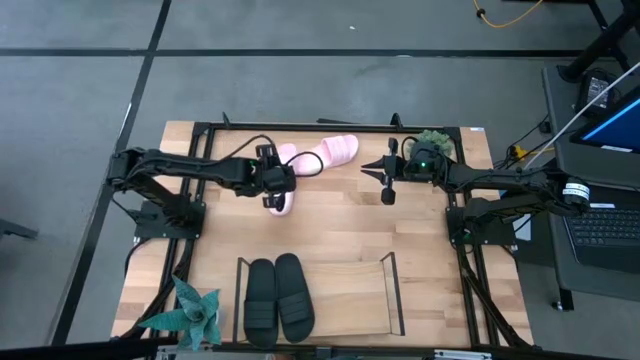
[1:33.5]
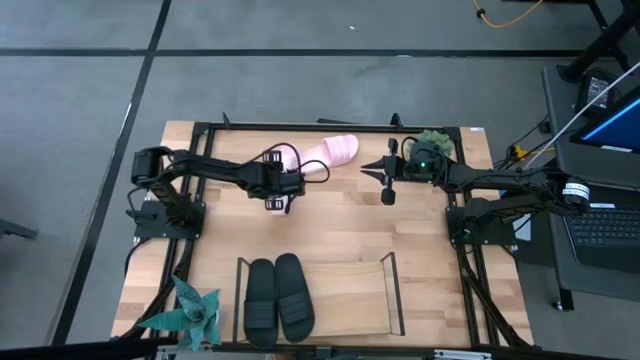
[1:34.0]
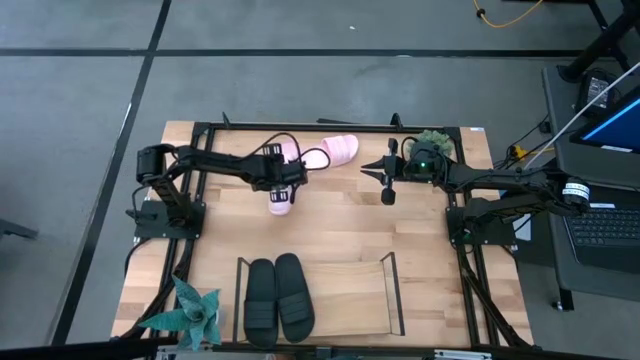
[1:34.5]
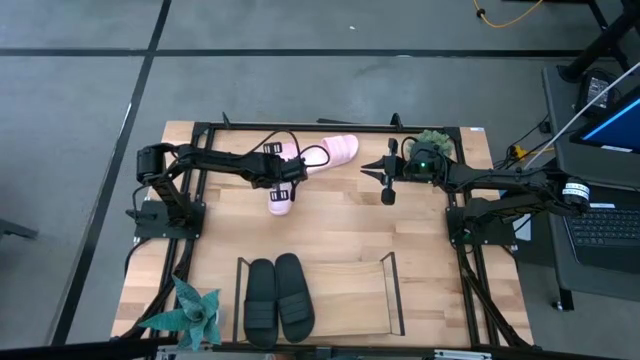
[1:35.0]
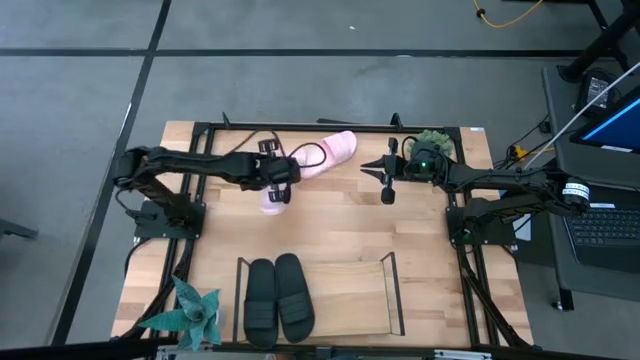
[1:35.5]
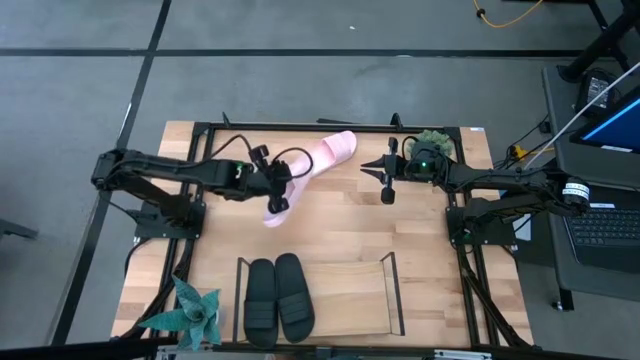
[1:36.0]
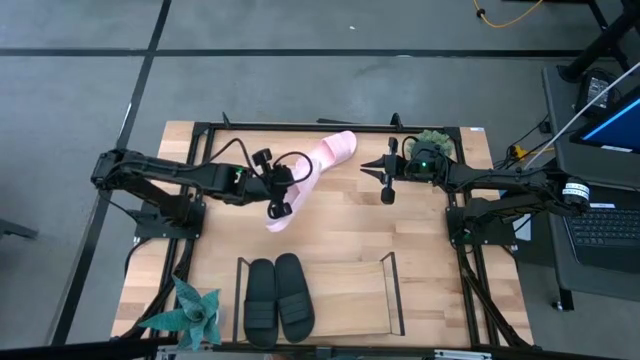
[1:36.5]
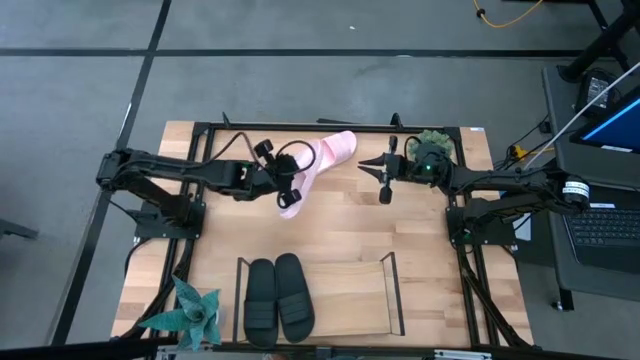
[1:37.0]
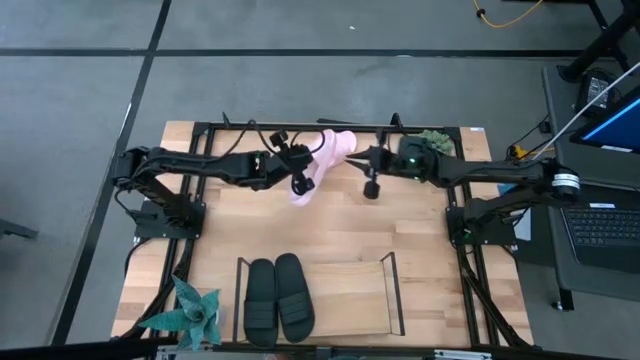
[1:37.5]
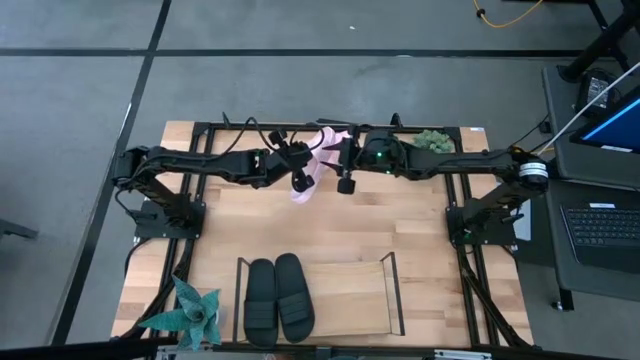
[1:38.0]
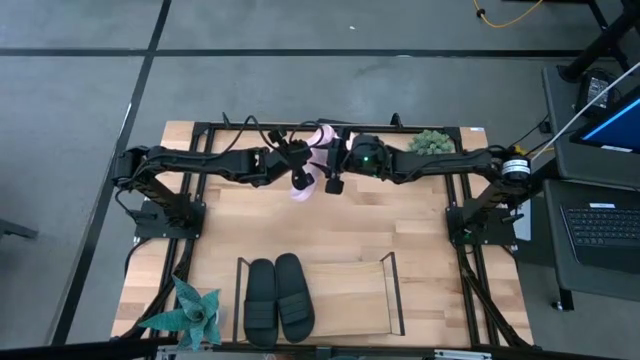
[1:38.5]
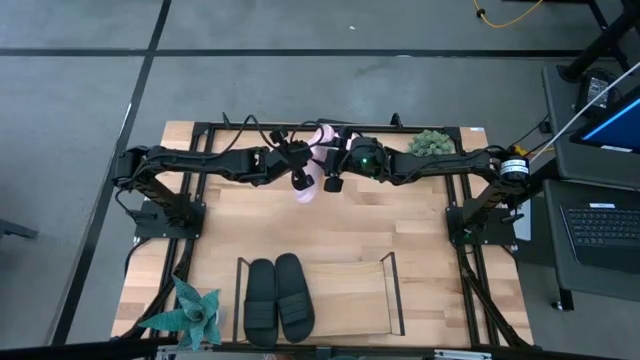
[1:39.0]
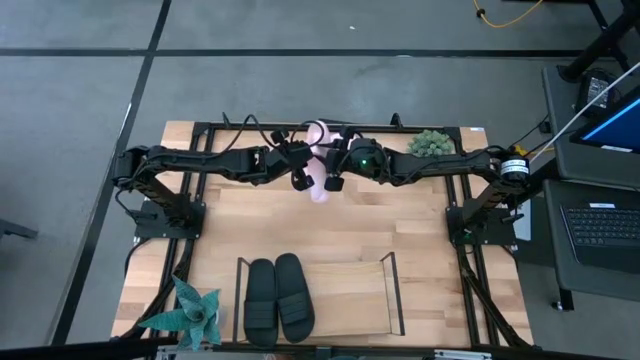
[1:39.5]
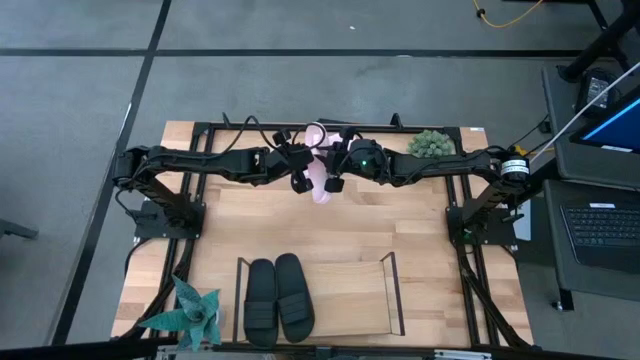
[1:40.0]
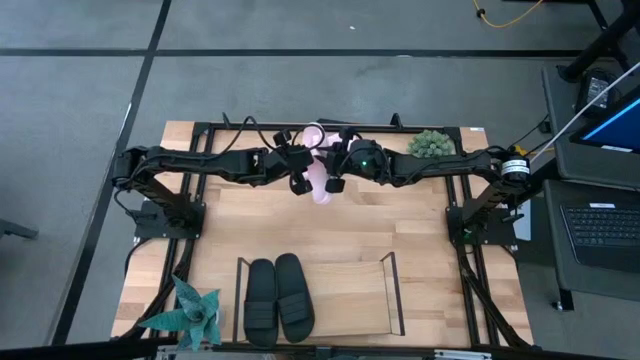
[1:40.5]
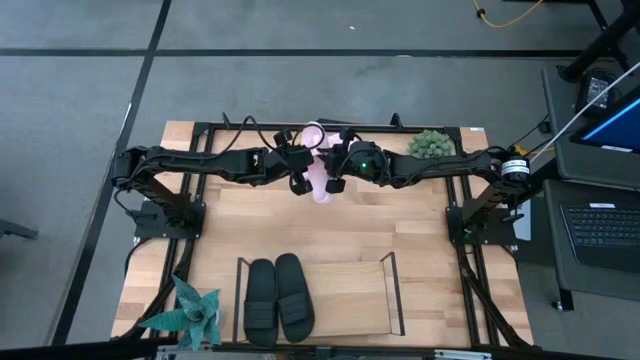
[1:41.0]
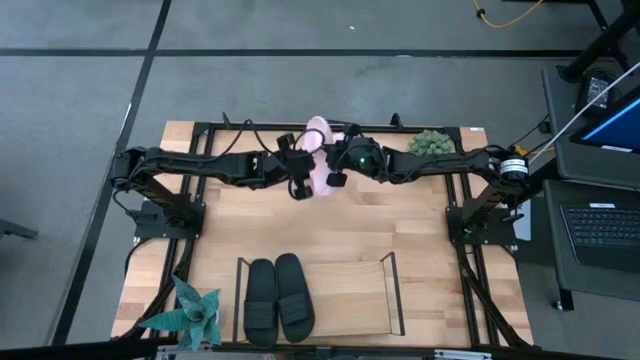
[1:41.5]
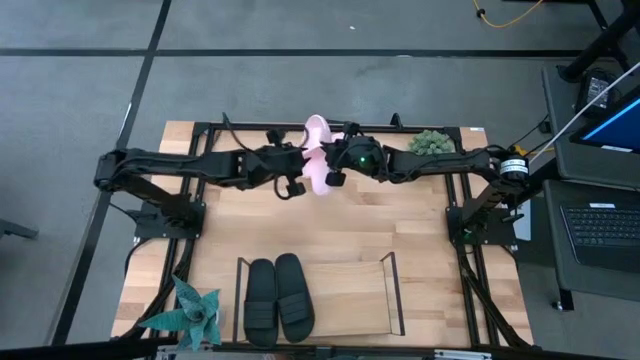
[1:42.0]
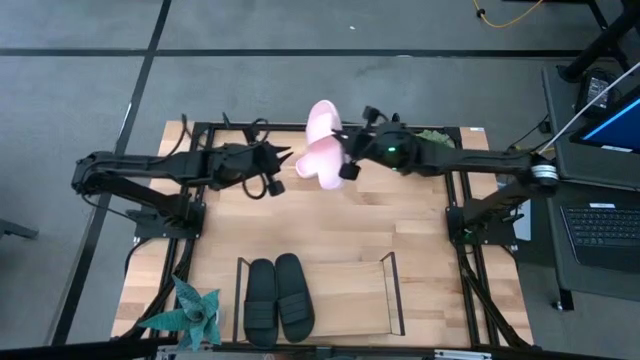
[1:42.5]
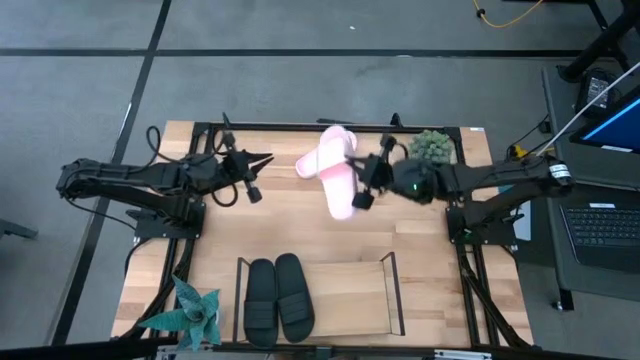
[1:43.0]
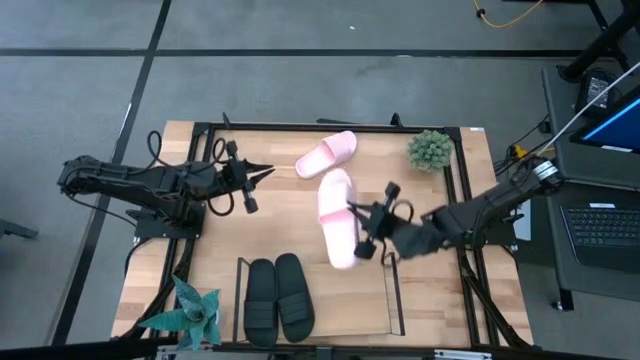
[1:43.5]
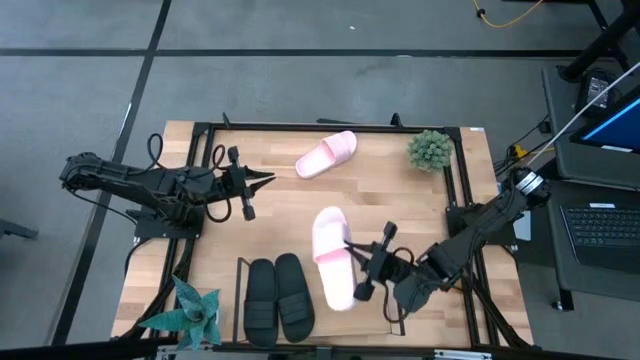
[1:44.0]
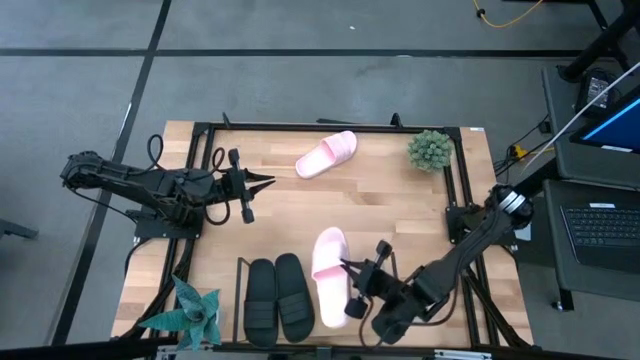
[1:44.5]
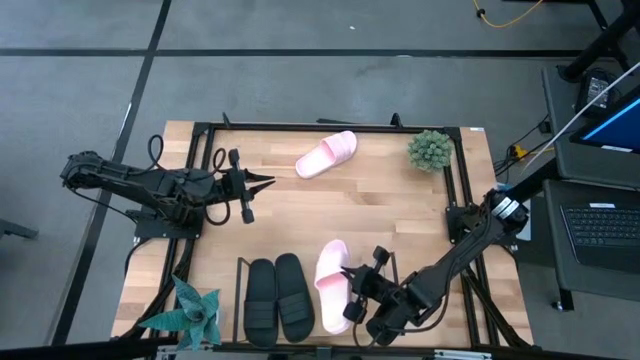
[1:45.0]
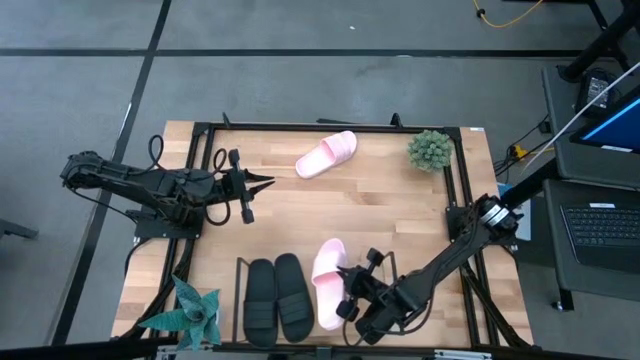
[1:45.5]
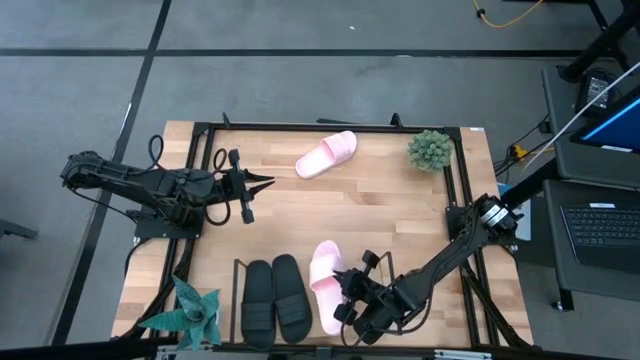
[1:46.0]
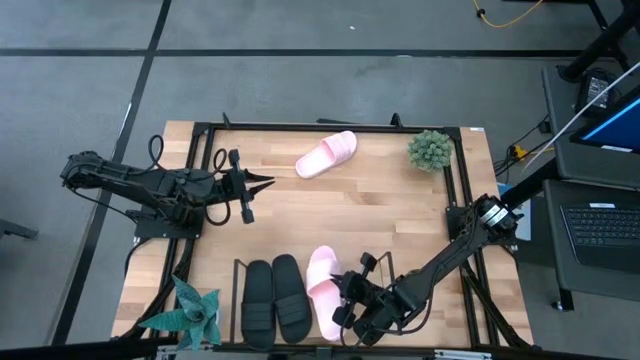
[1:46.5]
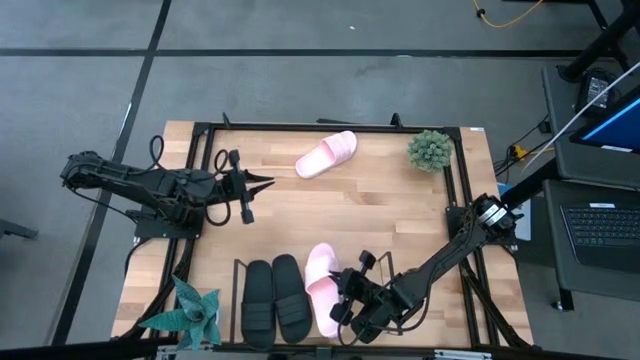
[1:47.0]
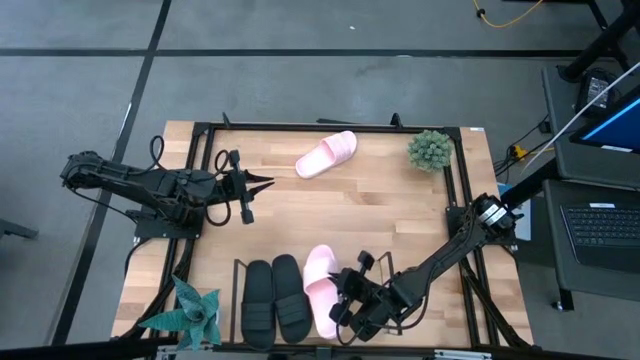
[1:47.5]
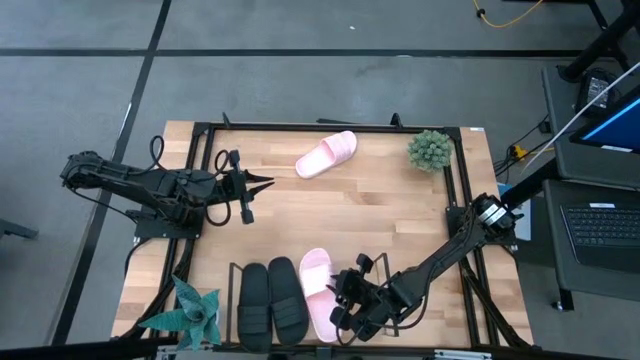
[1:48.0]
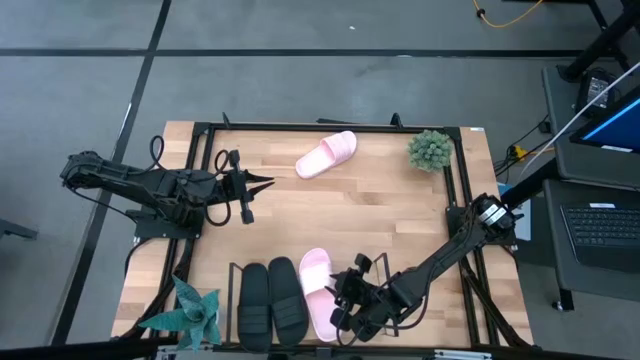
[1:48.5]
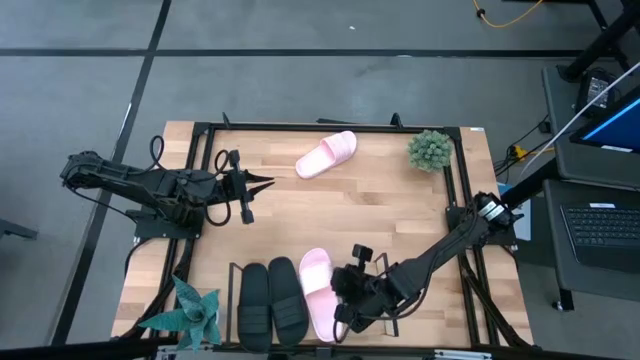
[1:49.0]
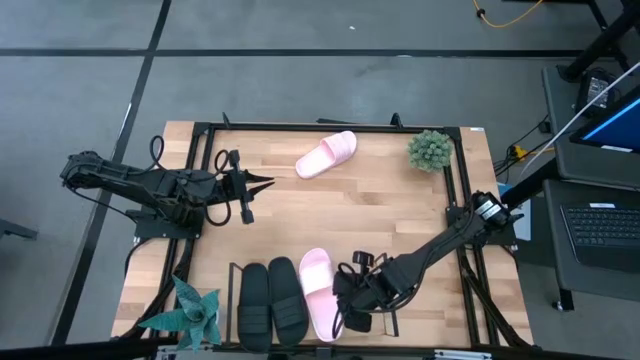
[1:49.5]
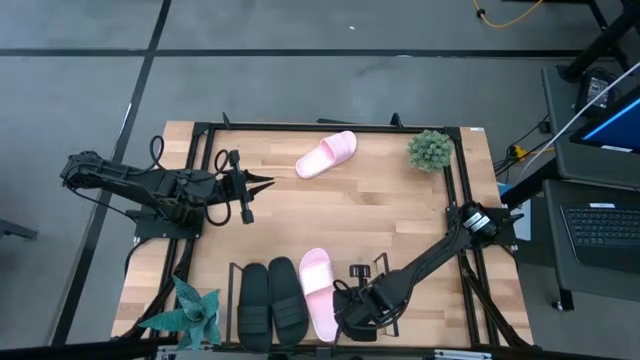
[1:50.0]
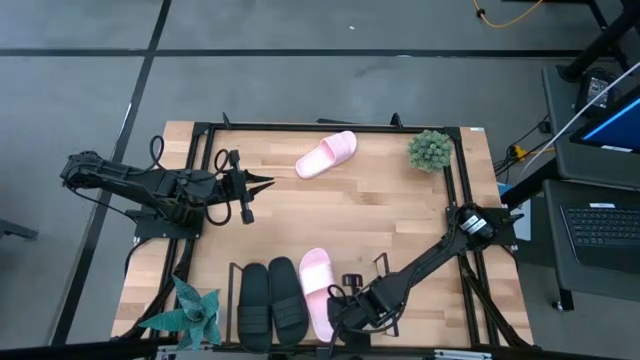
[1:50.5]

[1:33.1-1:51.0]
Task: Pick and place slides into the shelf
Put the right pink slide on the shelf

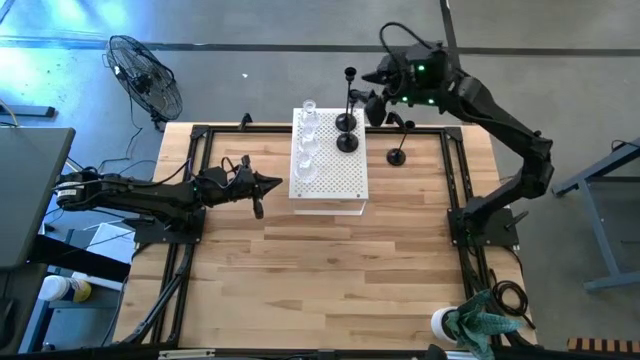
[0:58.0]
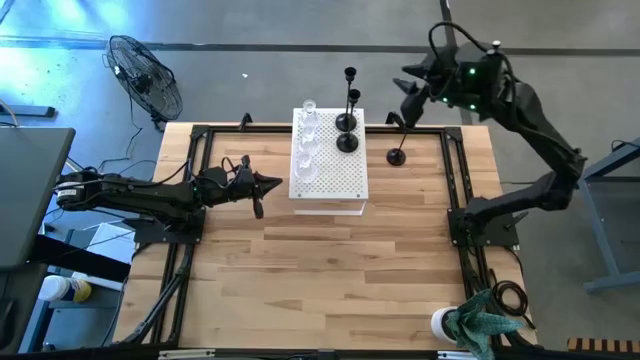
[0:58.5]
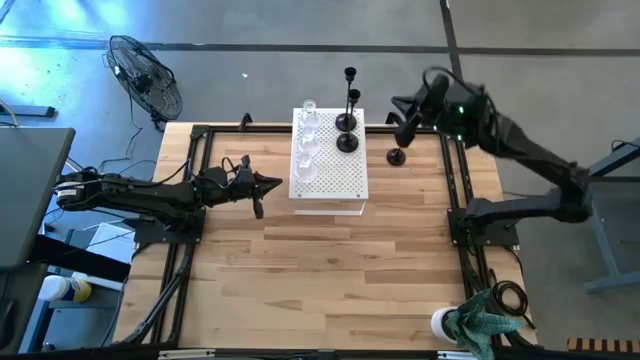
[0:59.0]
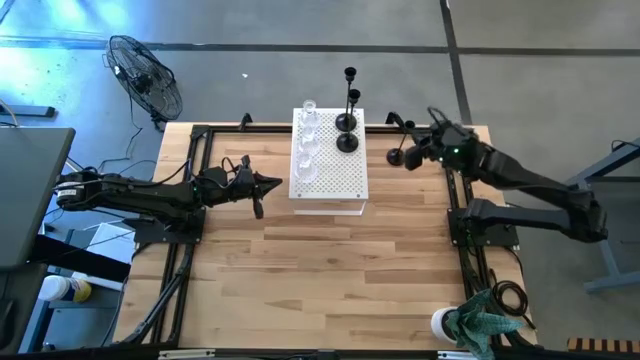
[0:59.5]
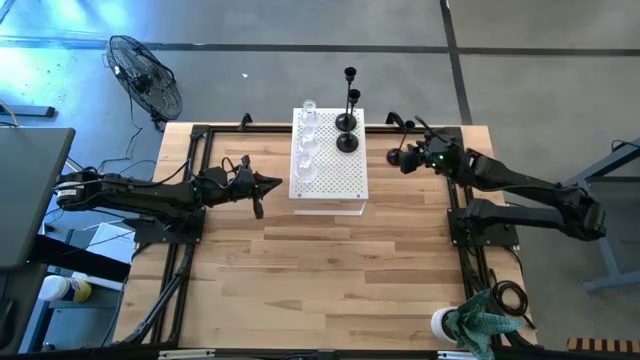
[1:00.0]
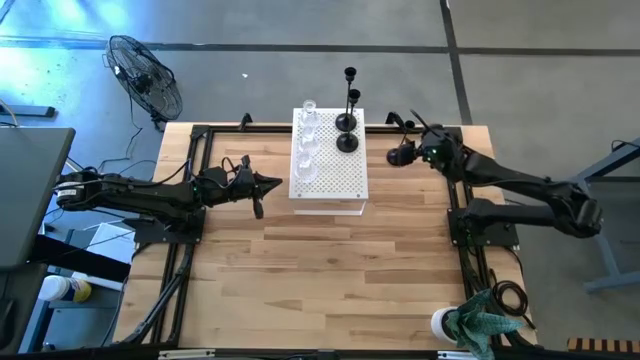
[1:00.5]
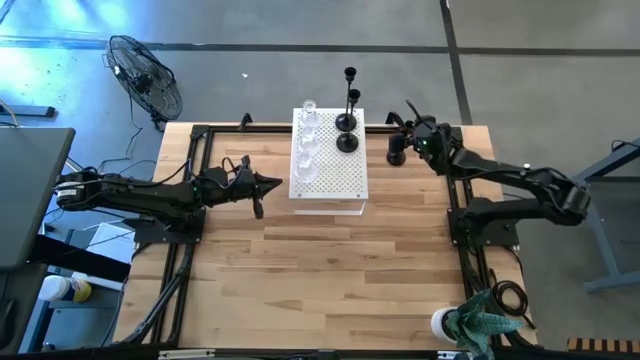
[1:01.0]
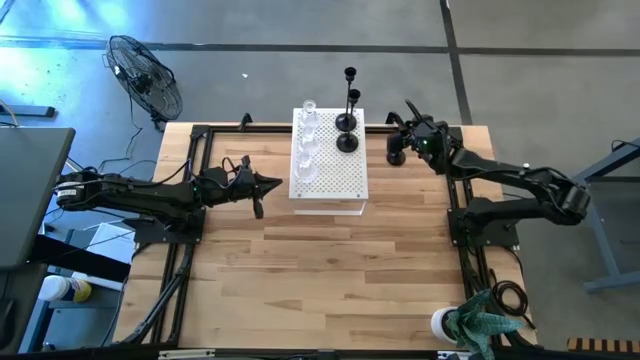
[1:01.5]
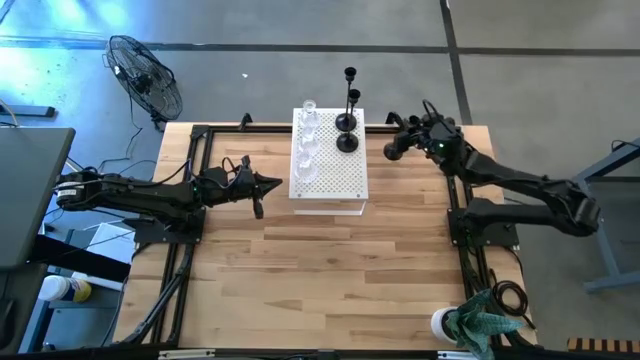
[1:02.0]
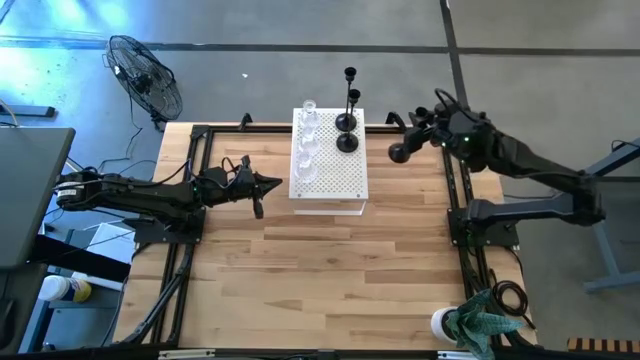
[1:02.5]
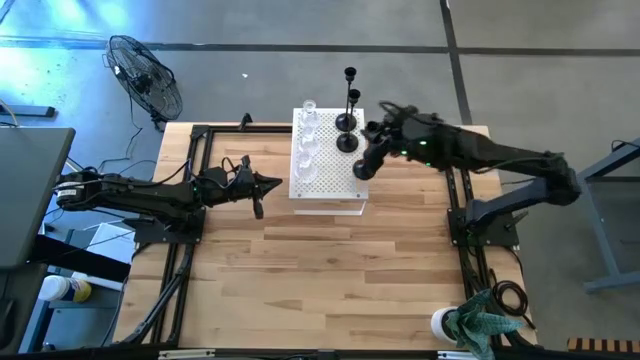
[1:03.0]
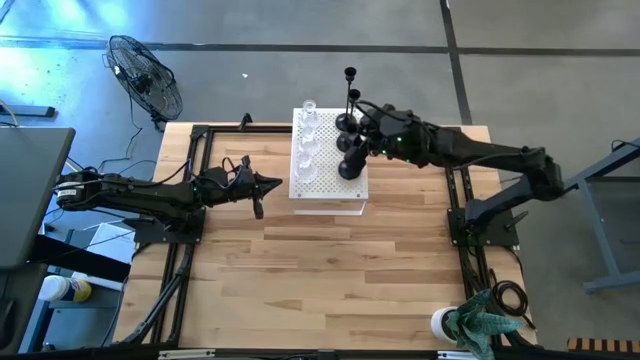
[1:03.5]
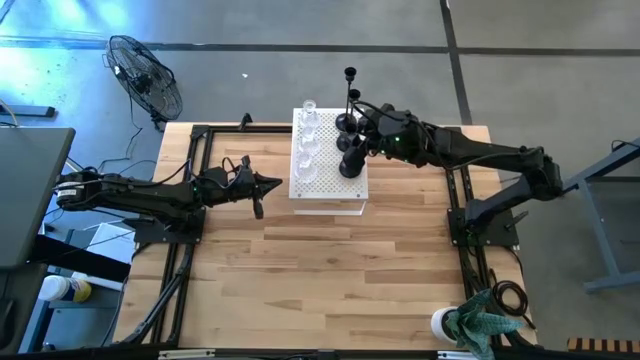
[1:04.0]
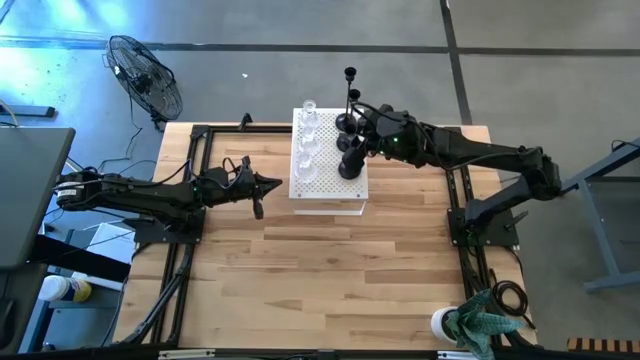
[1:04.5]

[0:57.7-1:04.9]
Task: Pick & Place candle stick holders
Put the black candle holder on the shelf aligned with the other black candle holders
